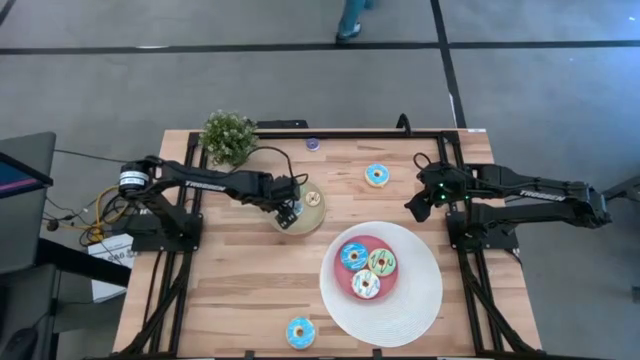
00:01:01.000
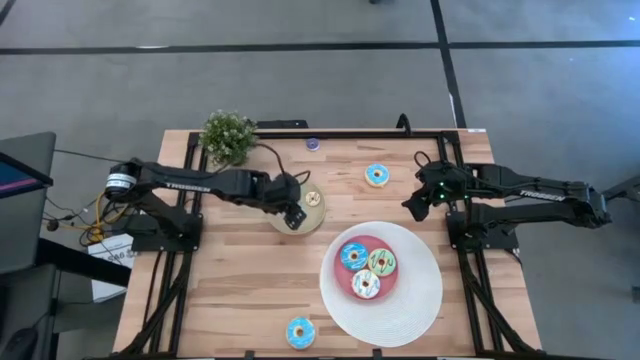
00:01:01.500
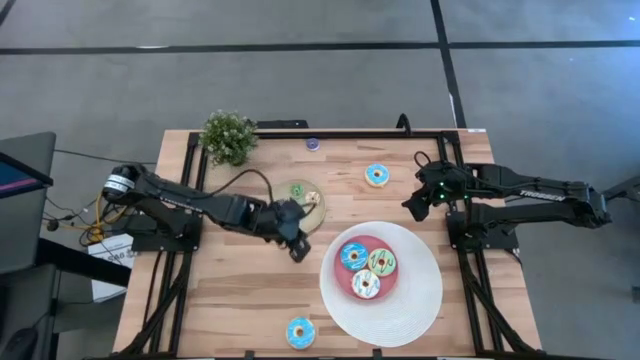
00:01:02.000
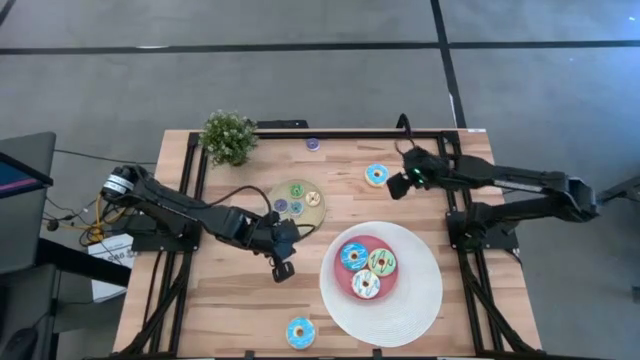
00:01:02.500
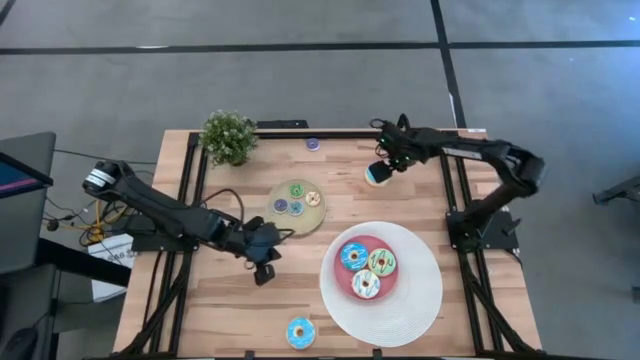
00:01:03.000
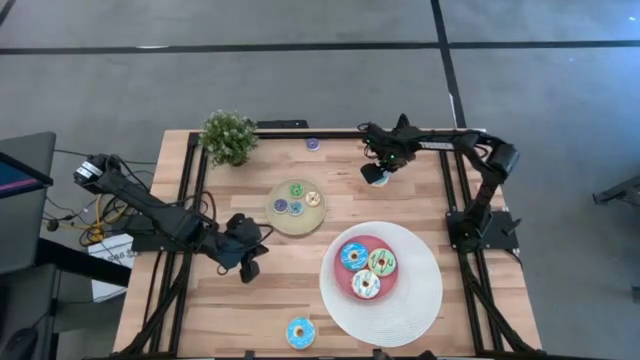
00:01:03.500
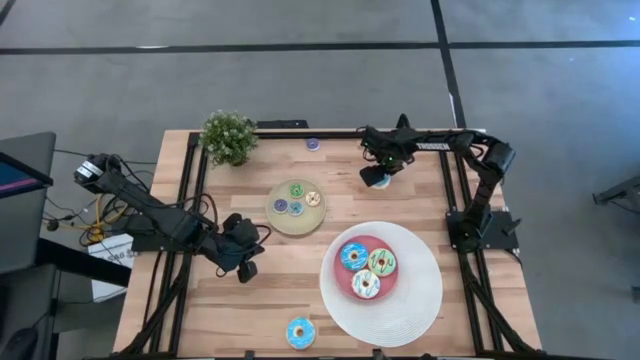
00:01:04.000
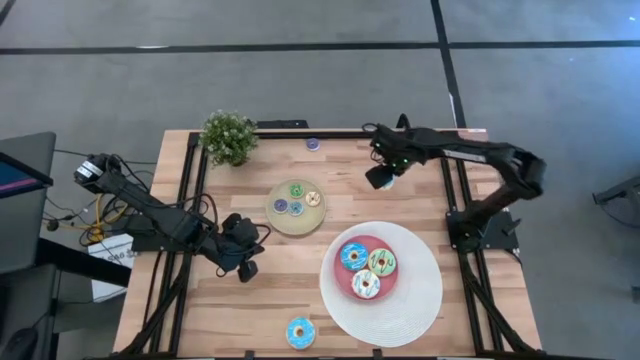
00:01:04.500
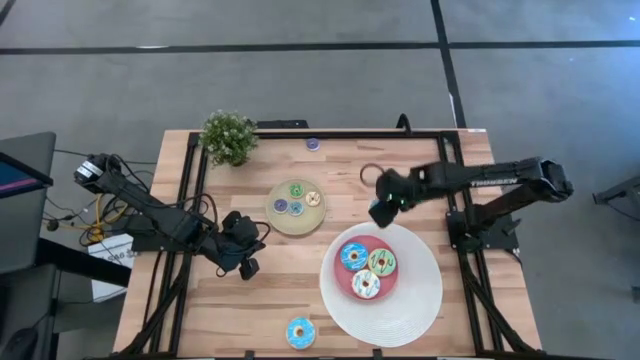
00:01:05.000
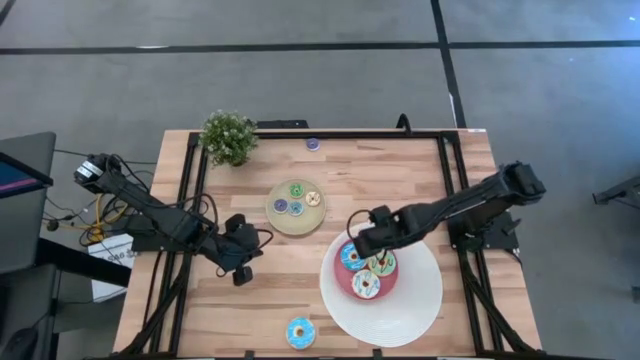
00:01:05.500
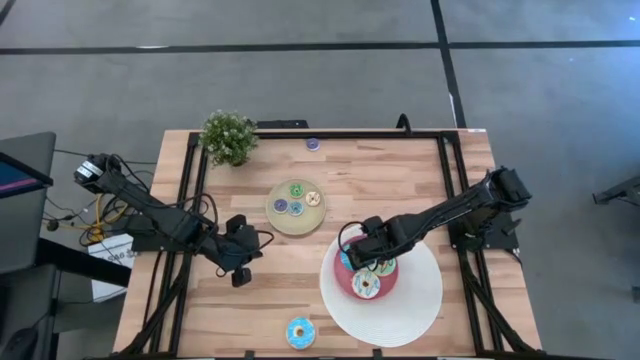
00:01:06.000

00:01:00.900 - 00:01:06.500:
Task: Pick & Place donuts
Put the top large blue donut on the pink plate

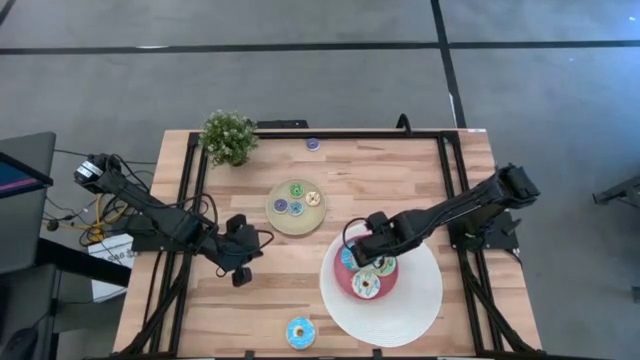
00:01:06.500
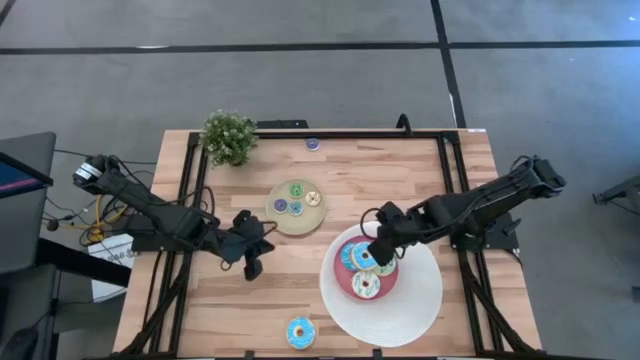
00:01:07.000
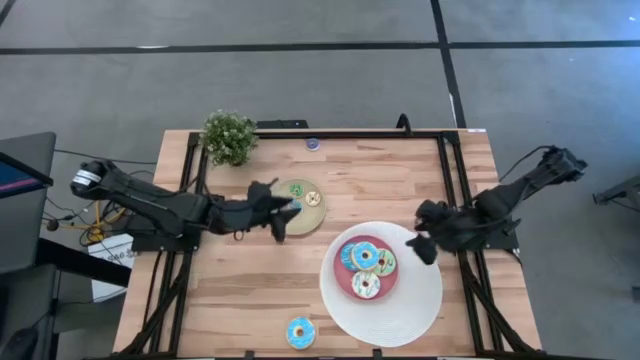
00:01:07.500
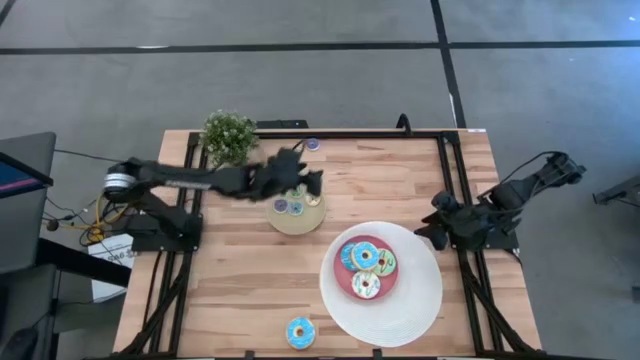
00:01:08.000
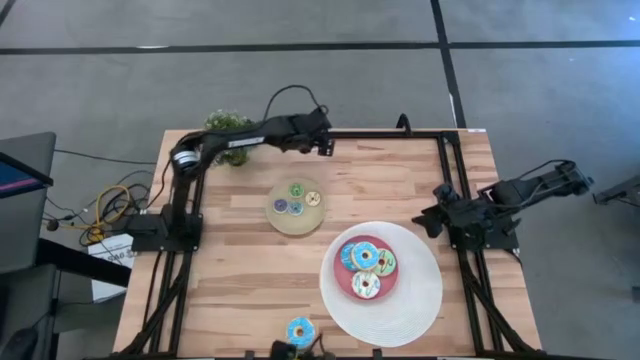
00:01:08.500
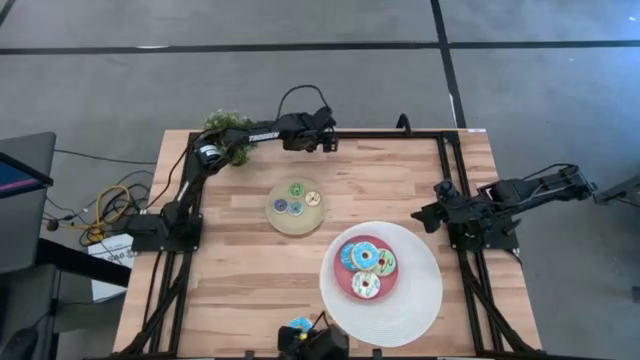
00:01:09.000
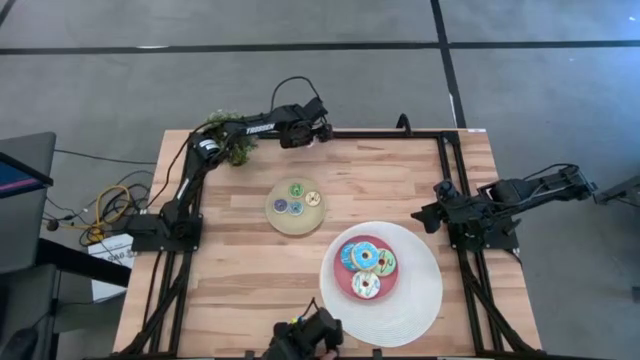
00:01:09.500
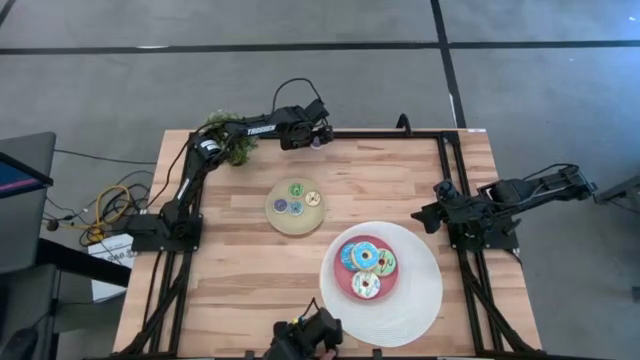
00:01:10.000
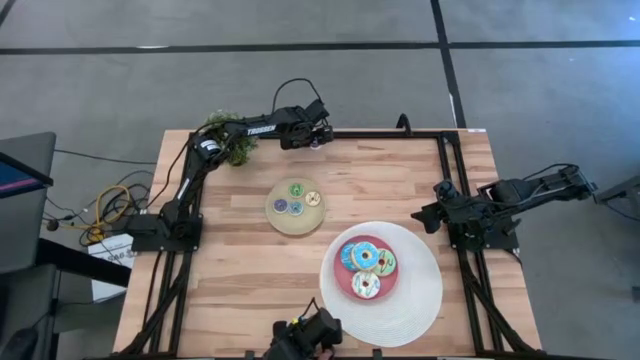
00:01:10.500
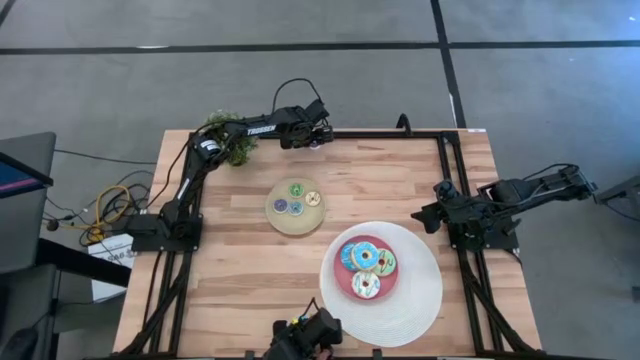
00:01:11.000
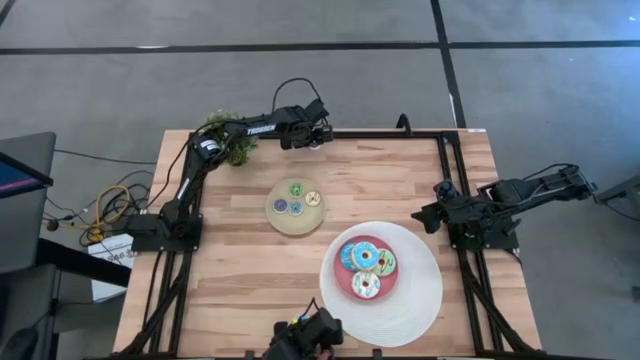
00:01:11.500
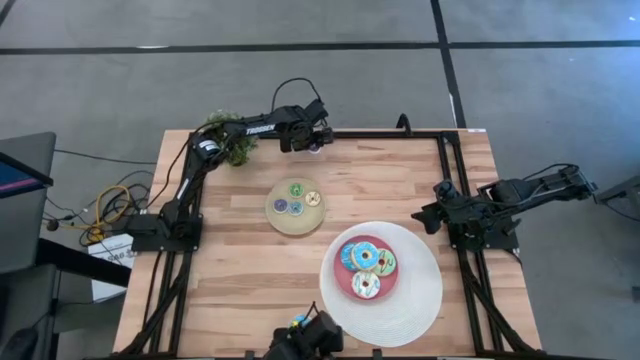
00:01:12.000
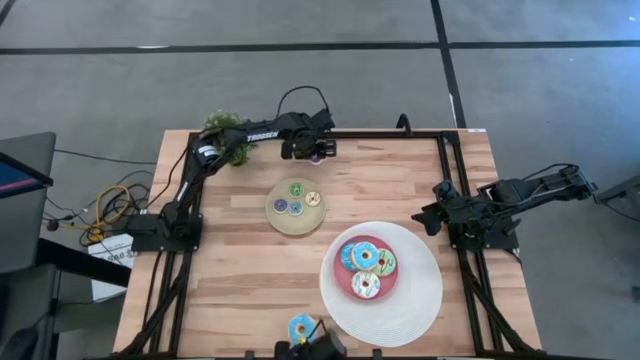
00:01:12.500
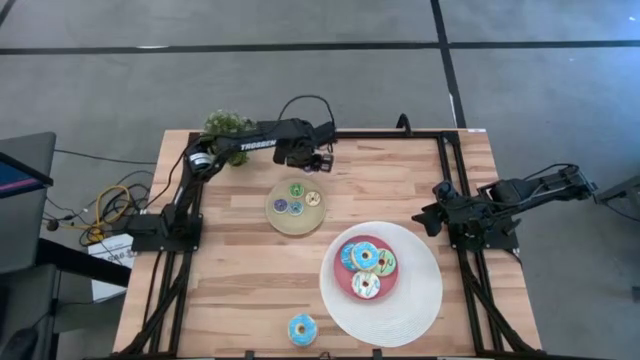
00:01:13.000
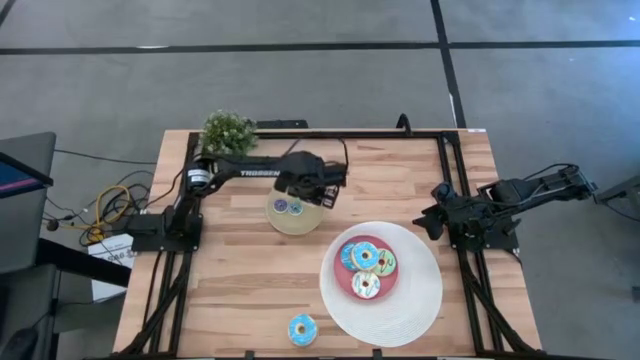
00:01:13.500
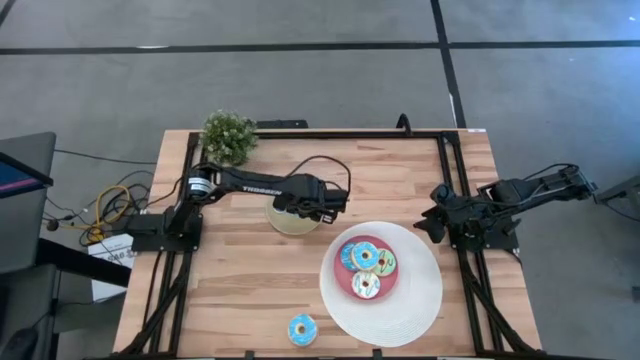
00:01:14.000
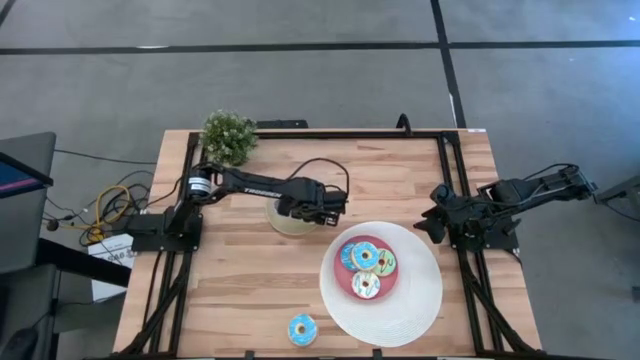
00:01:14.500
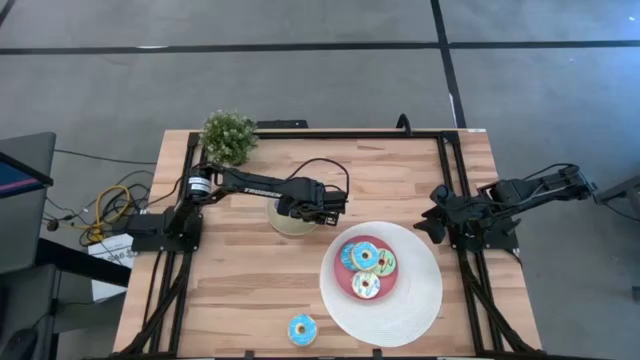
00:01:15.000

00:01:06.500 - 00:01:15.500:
Put the small dark blue donut on the brown plate

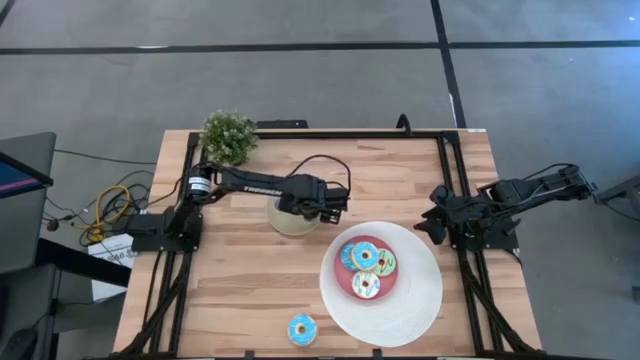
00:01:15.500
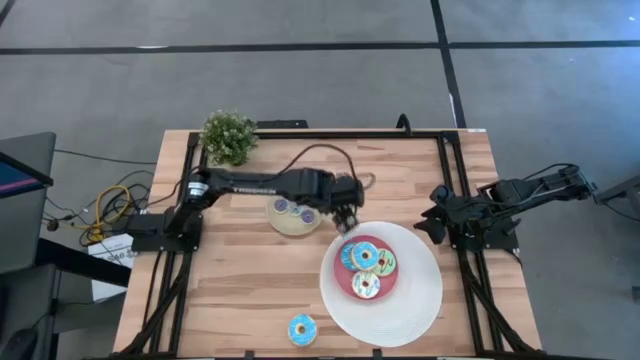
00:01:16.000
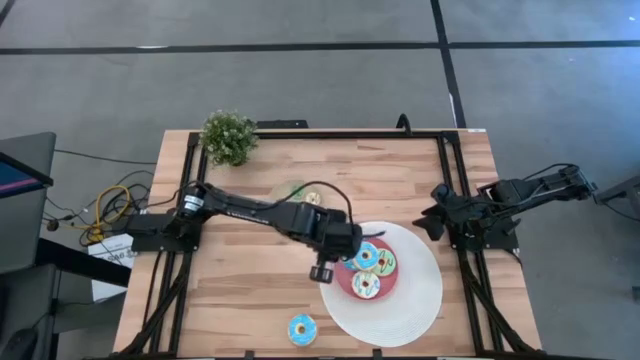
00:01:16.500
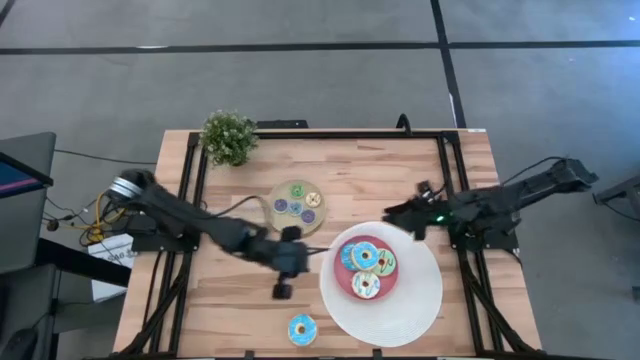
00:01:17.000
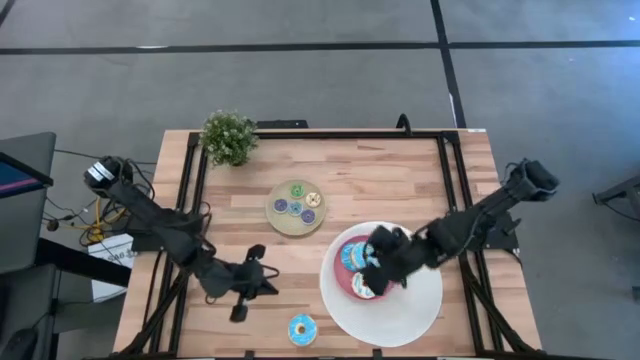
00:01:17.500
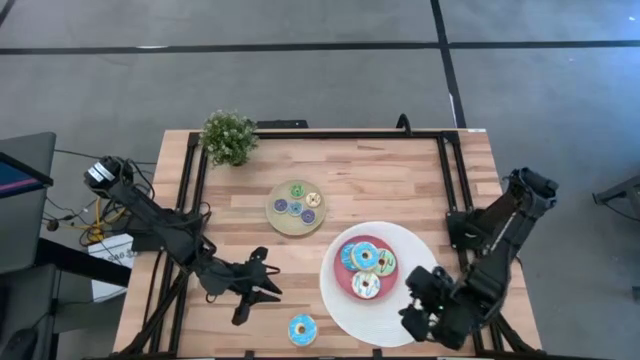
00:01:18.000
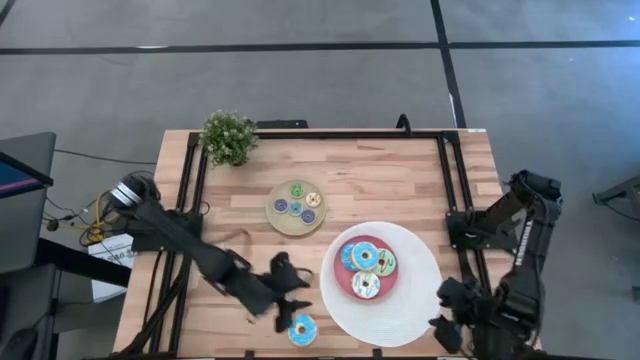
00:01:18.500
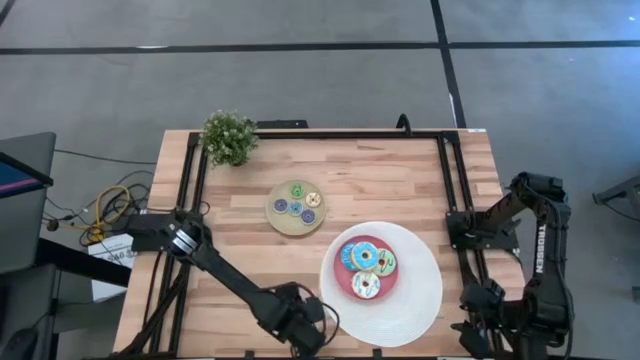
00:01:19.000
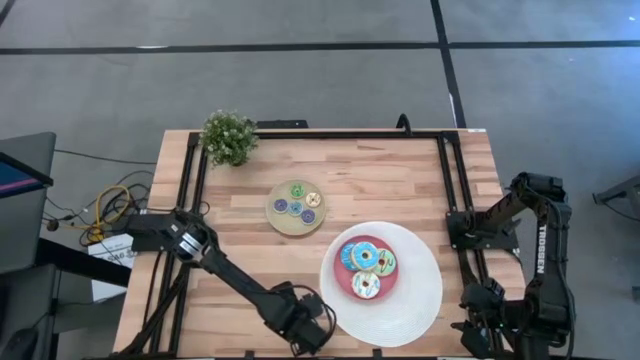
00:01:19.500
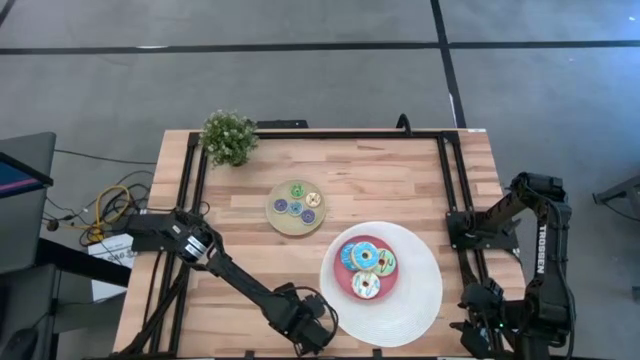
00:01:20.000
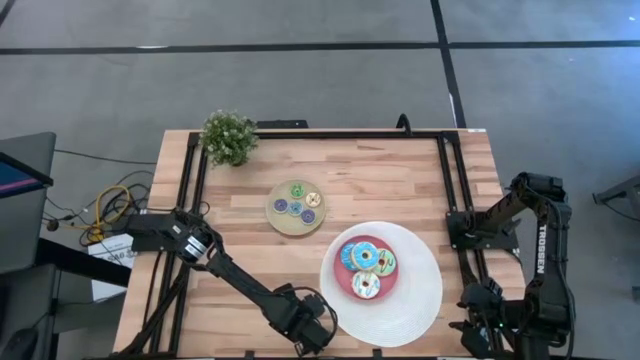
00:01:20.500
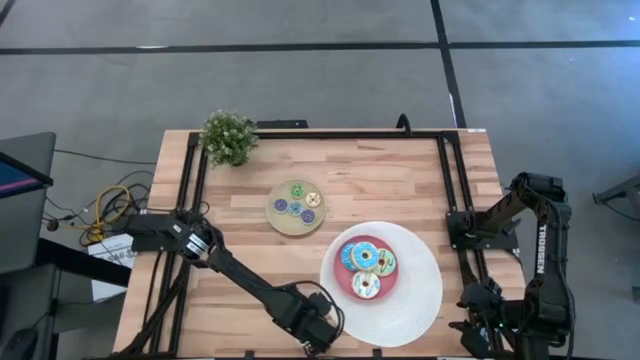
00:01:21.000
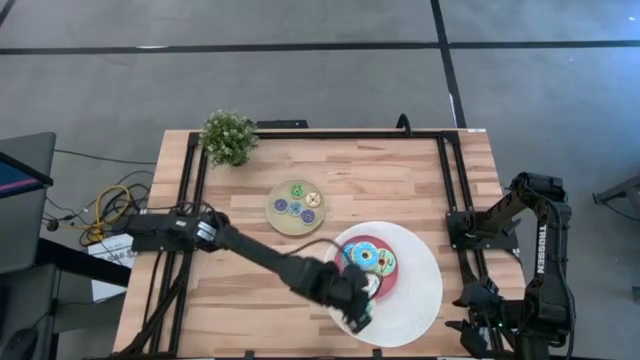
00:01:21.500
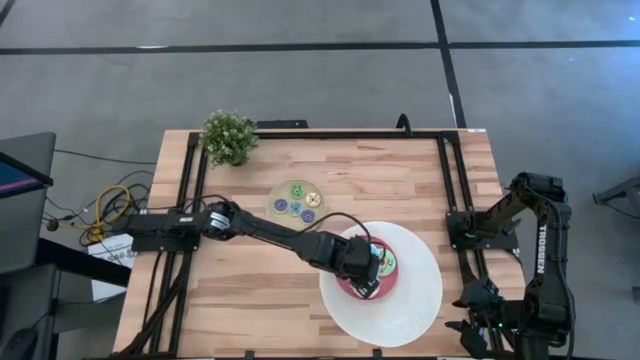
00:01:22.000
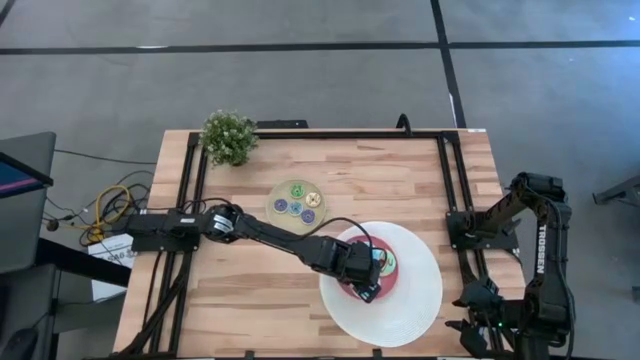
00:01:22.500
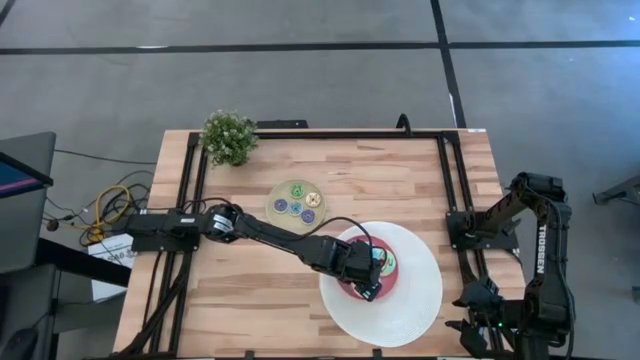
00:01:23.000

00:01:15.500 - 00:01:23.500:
Put the large blue donut on the pink plate
